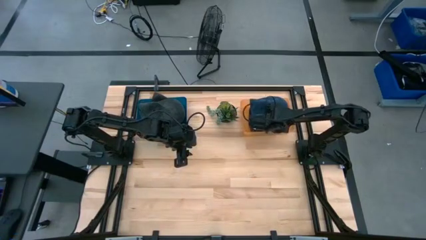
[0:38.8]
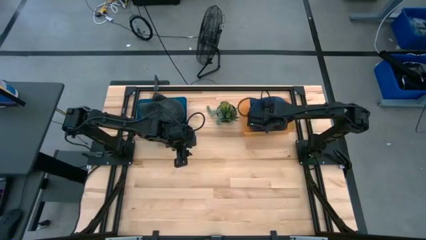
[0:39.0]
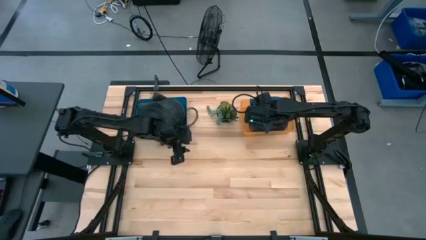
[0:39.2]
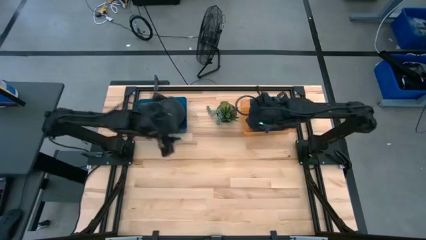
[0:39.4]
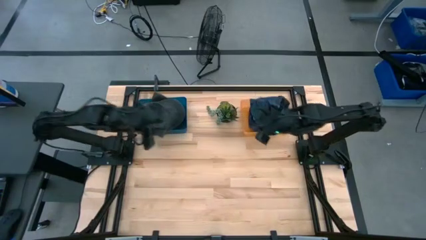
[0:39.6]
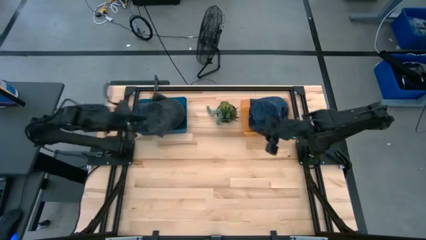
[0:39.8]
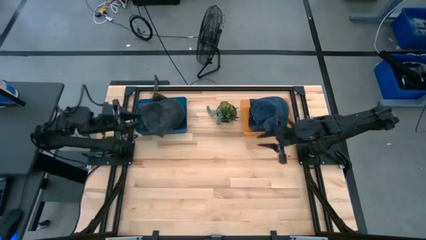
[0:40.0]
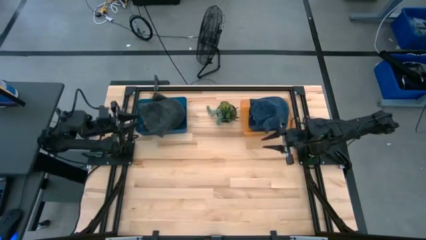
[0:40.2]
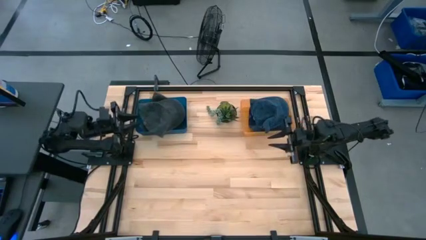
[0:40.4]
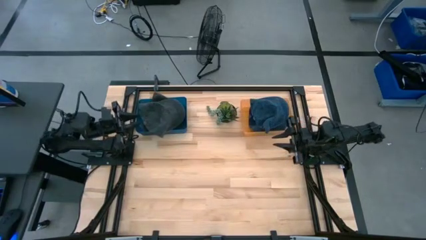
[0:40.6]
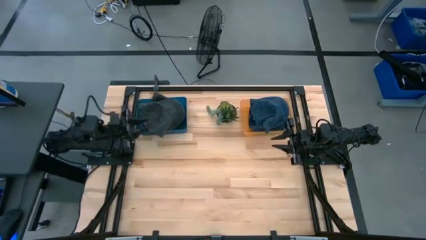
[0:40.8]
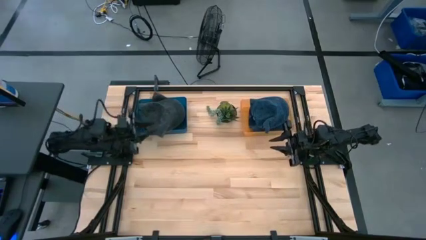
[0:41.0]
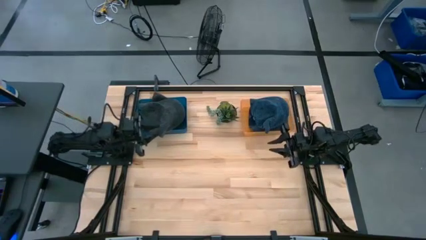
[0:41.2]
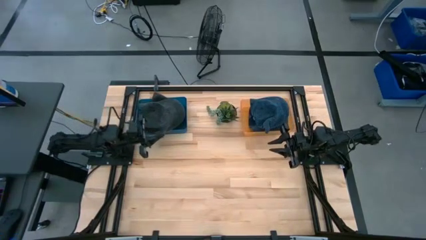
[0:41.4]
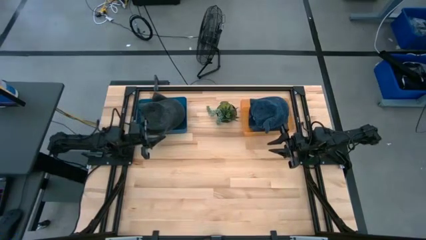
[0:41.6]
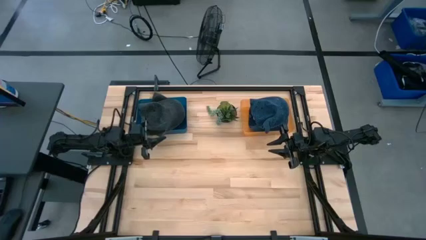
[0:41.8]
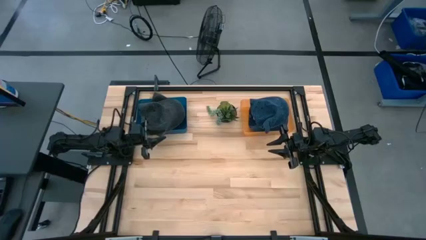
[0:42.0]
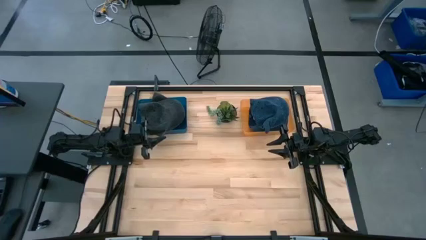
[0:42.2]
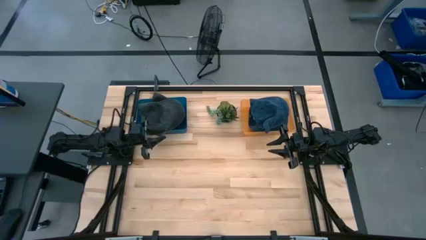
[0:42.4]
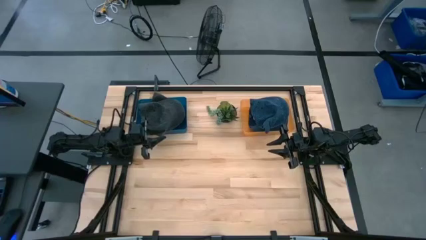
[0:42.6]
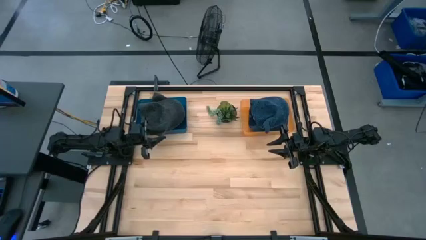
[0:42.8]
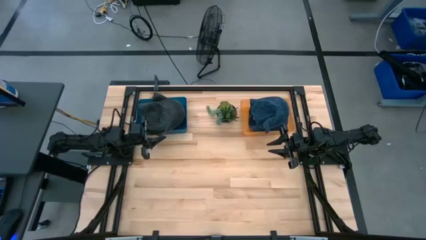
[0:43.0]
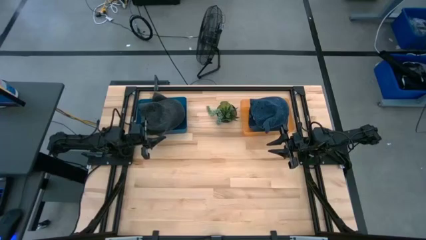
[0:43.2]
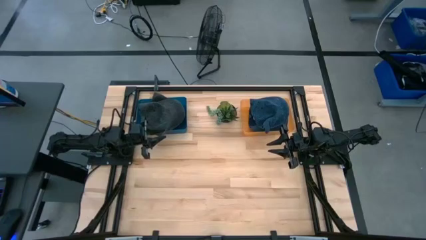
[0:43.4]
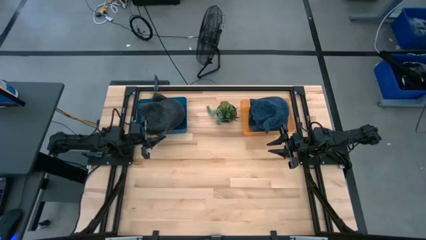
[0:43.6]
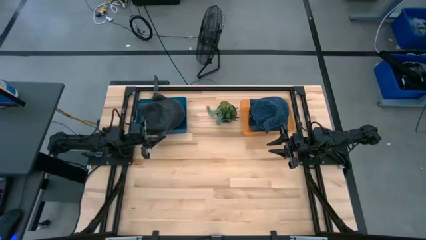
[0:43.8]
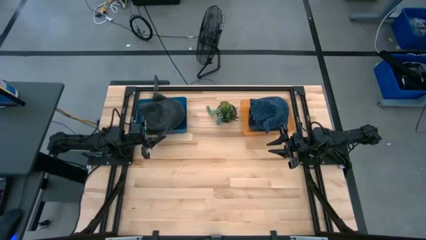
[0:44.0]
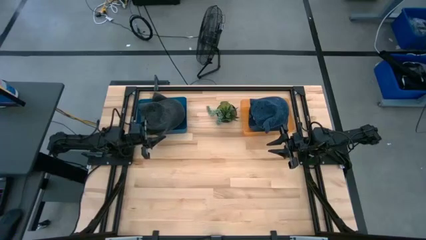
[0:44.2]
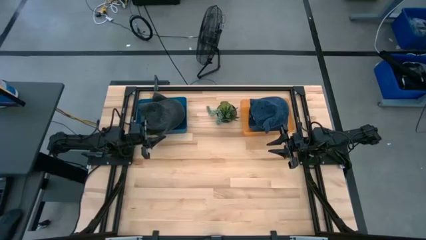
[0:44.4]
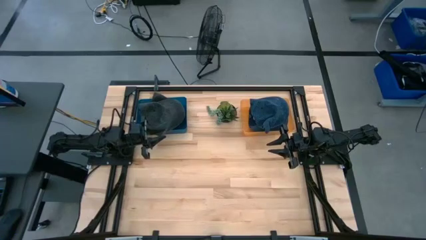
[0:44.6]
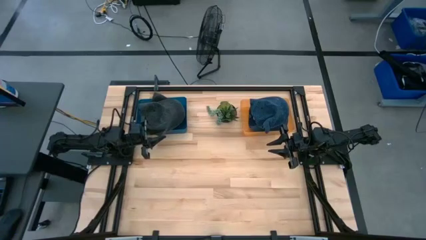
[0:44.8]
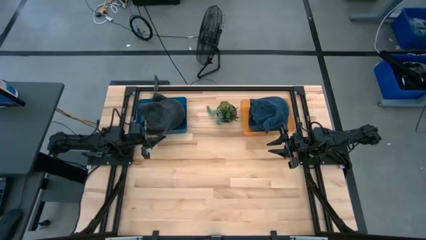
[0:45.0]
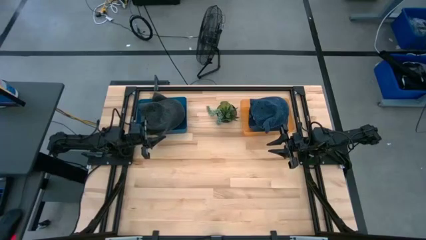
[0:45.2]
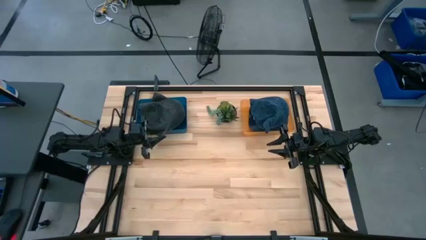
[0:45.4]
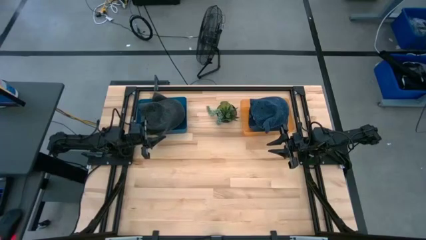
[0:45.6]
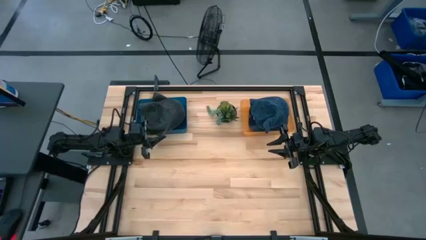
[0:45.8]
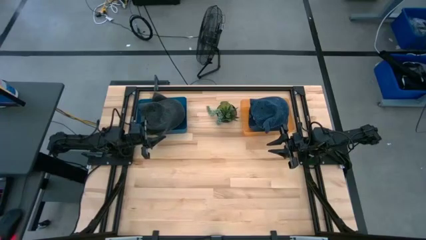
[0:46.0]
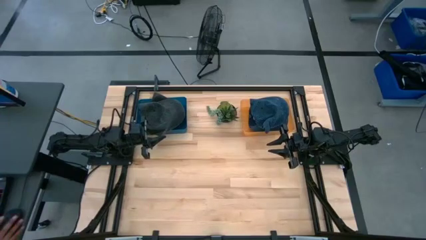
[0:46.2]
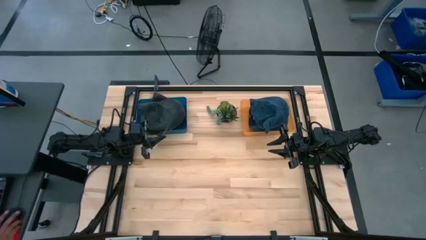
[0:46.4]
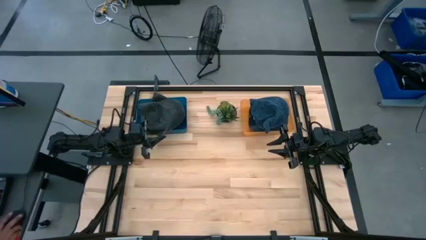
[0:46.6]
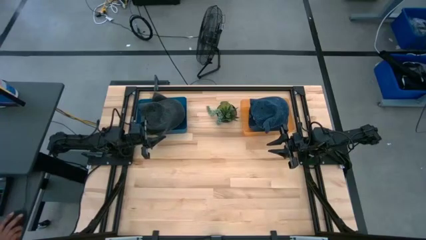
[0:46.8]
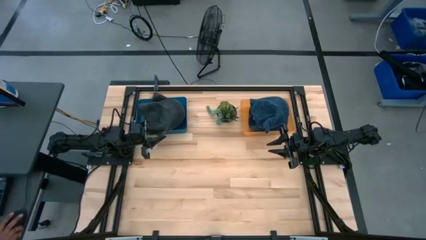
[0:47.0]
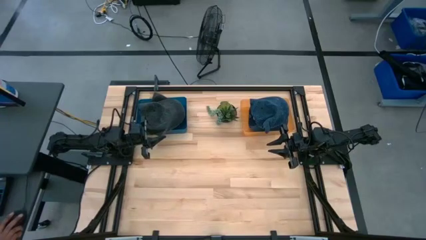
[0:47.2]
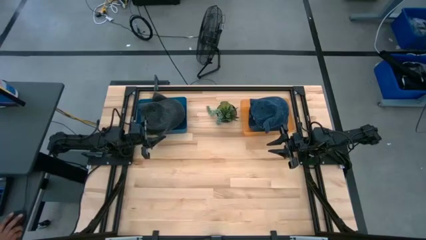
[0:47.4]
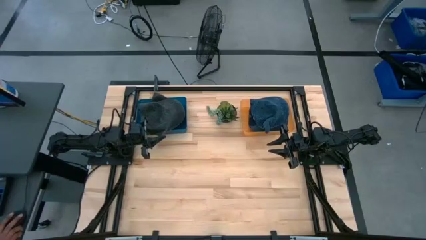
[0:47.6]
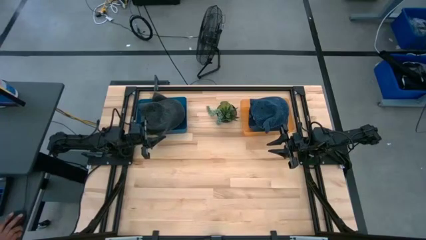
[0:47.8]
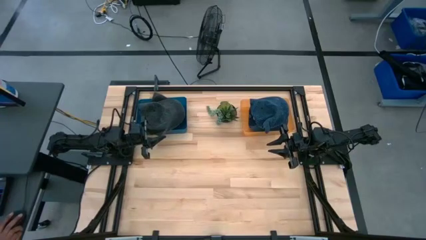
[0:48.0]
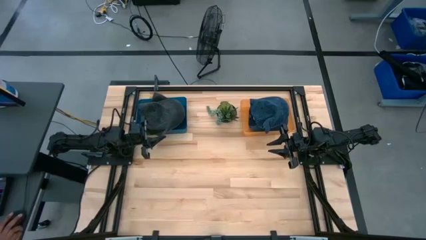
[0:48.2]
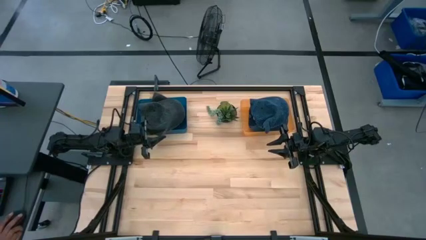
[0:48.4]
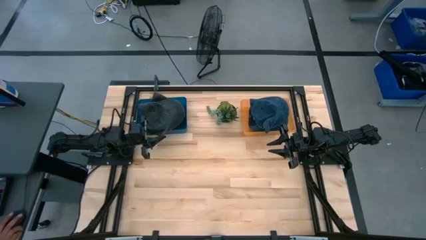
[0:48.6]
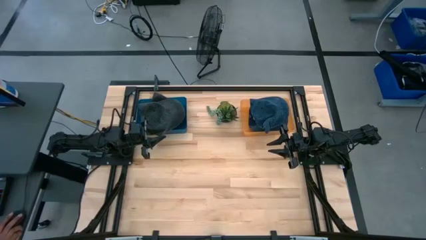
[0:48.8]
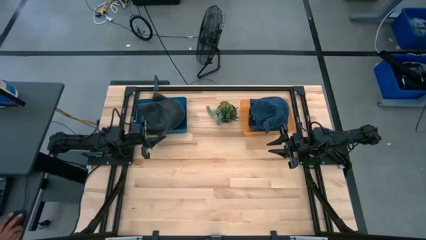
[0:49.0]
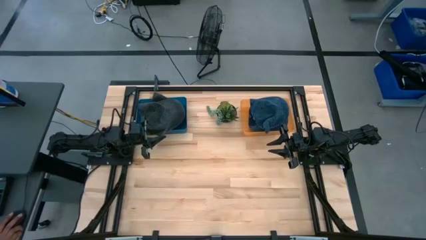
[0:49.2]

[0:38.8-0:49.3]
Task: Pick & Place hat
Return to home position
